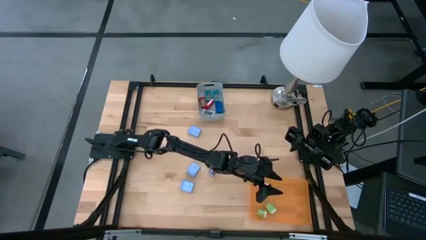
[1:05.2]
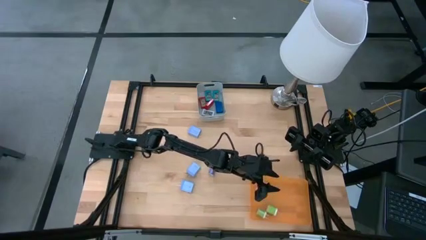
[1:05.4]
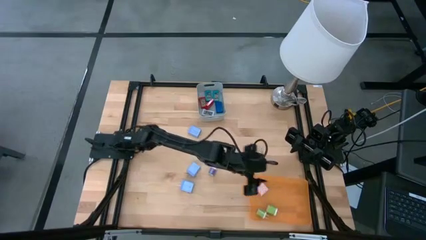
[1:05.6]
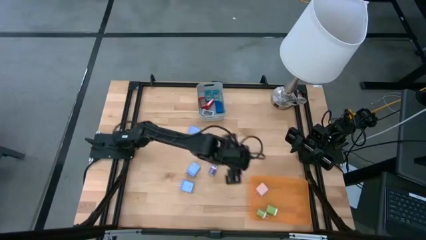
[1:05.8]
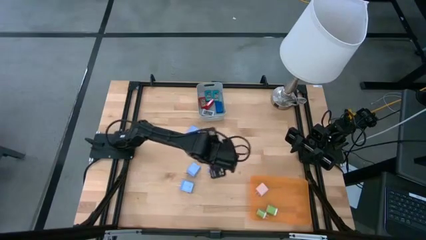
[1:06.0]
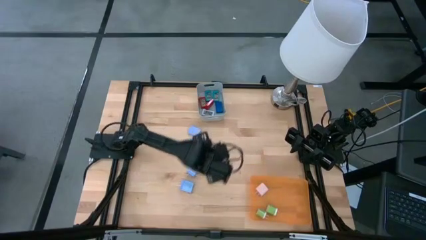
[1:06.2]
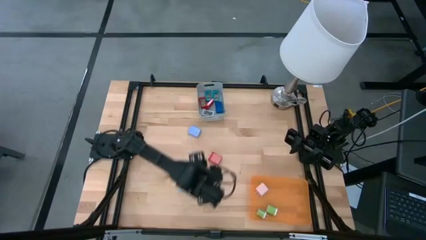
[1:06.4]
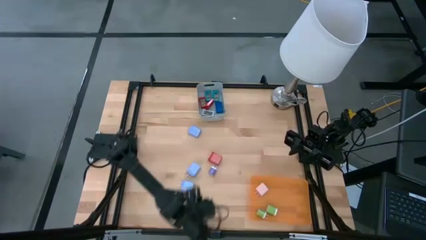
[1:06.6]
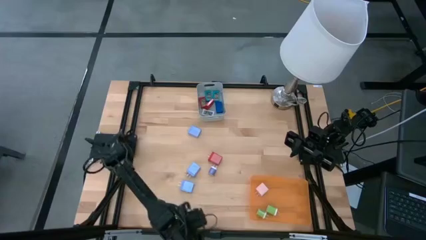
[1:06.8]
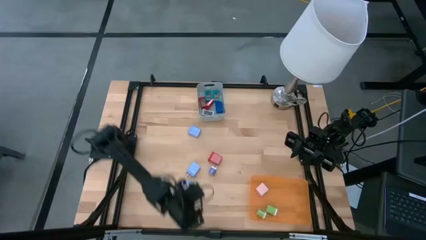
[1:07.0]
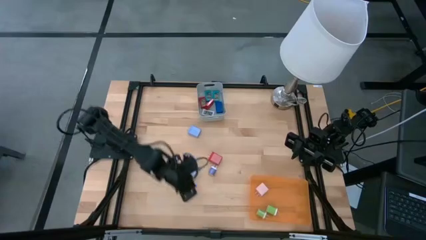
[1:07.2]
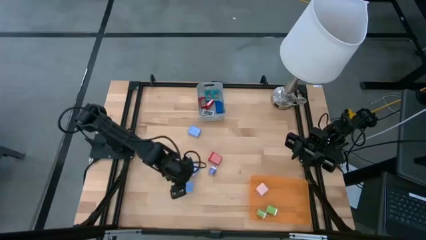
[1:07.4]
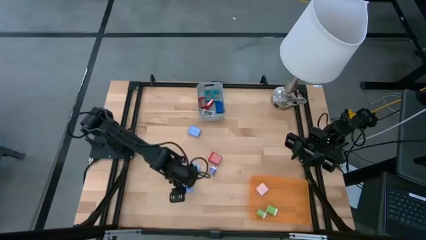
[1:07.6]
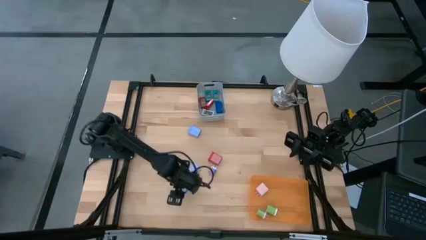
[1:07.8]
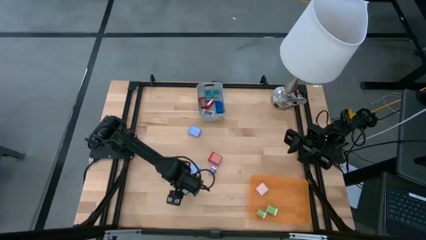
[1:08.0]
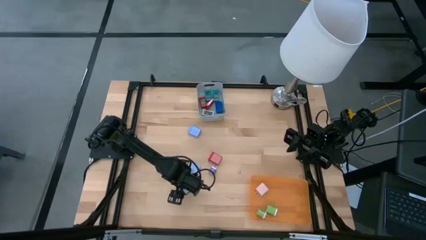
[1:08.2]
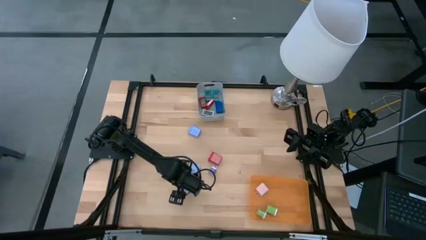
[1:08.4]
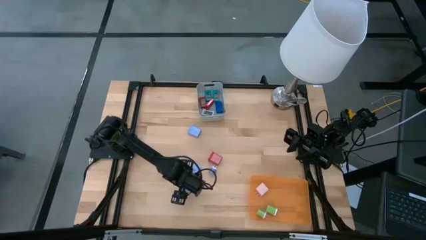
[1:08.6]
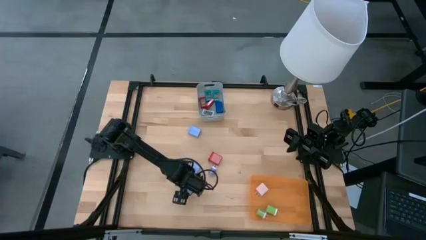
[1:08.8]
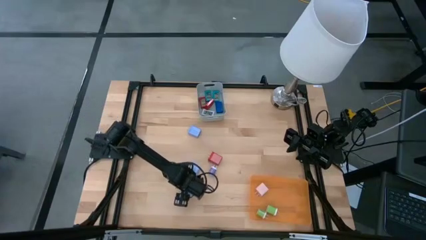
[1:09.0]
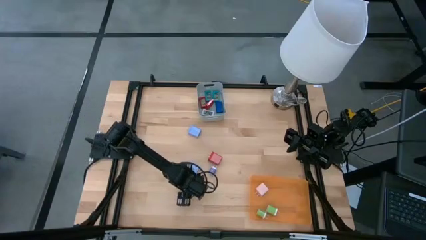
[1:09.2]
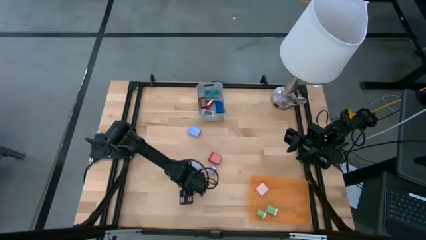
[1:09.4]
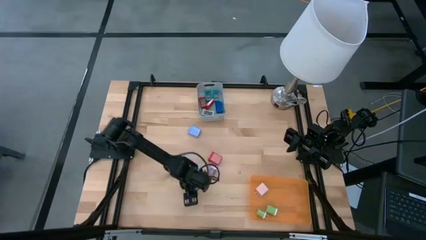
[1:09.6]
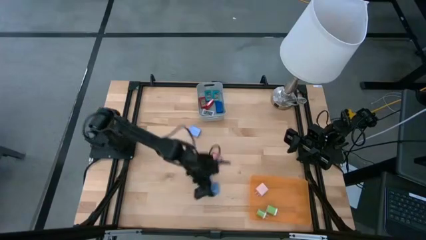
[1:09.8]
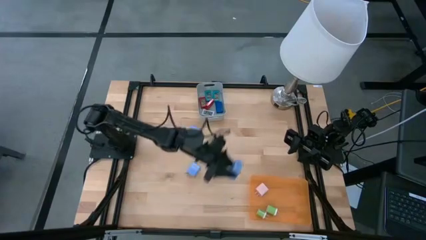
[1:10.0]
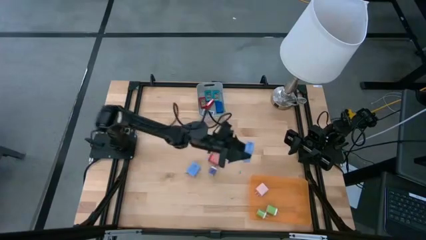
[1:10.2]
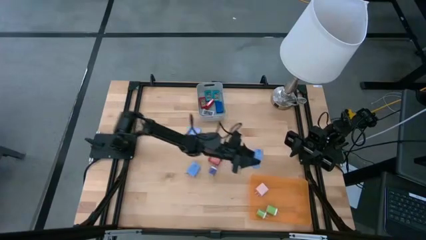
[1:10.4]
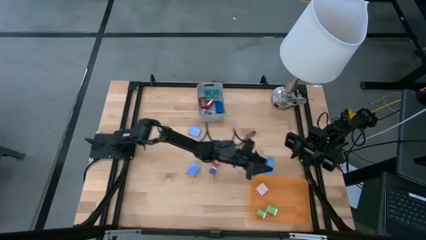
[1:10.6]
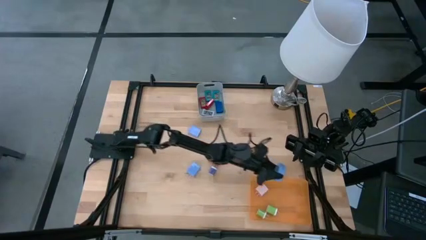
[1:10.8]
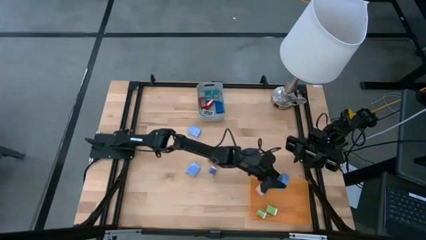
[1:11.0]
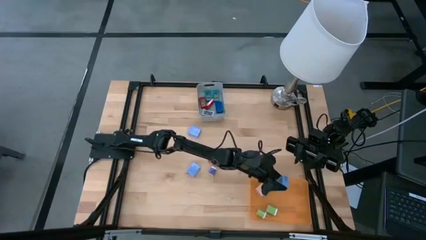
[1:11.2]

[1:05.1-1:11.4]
Task: Pick & Place Office items
Put the bottom light blue charger adapter into the orange bin

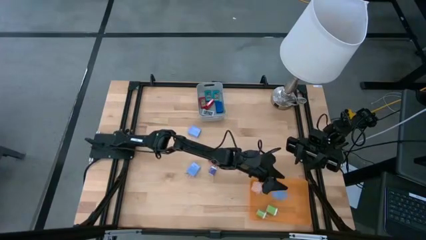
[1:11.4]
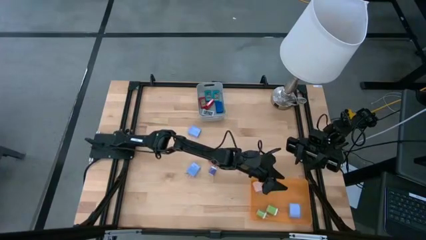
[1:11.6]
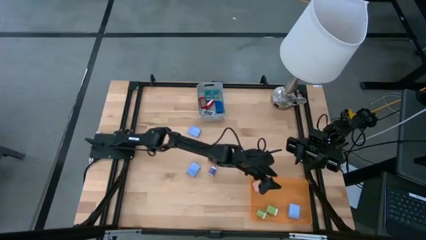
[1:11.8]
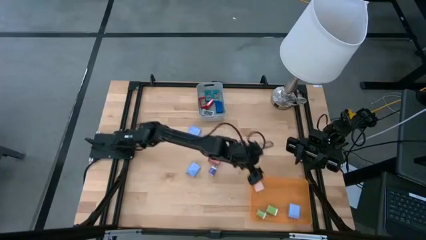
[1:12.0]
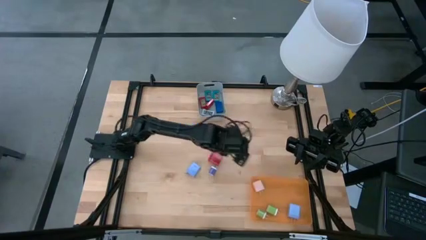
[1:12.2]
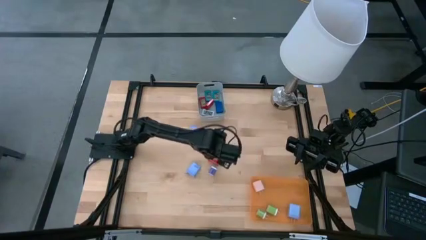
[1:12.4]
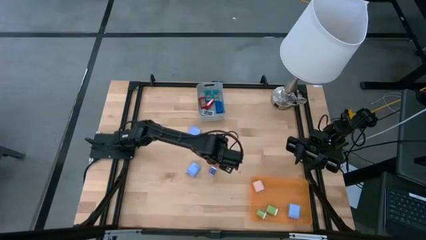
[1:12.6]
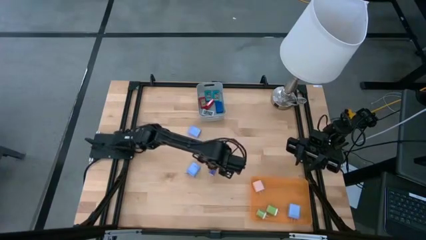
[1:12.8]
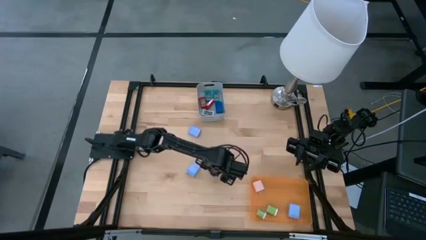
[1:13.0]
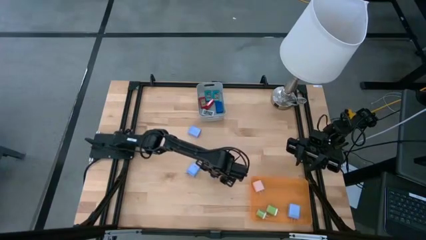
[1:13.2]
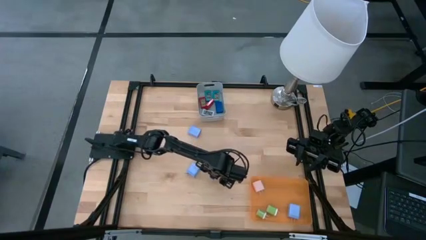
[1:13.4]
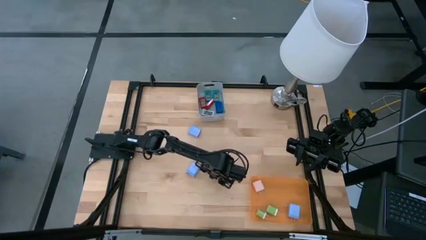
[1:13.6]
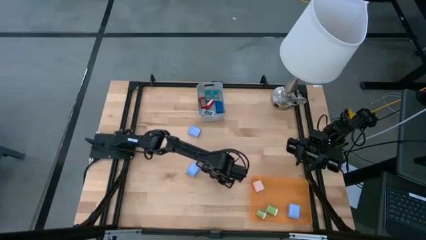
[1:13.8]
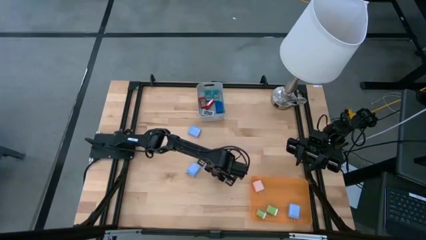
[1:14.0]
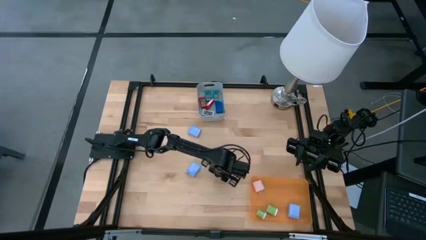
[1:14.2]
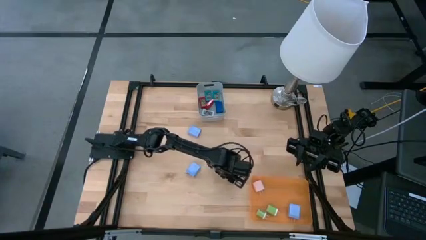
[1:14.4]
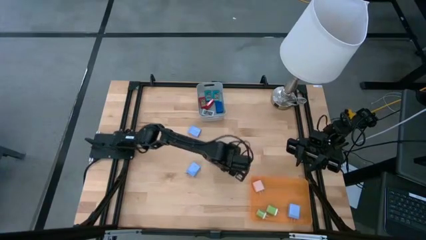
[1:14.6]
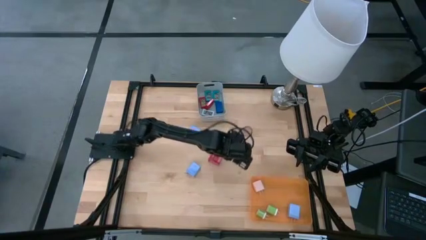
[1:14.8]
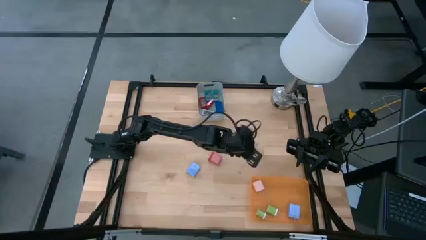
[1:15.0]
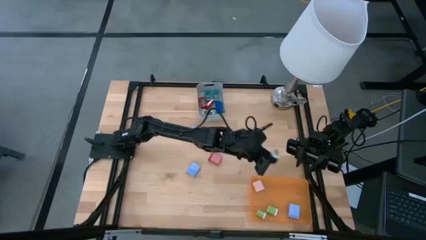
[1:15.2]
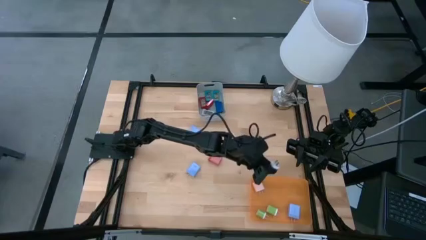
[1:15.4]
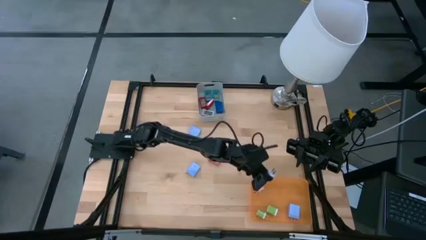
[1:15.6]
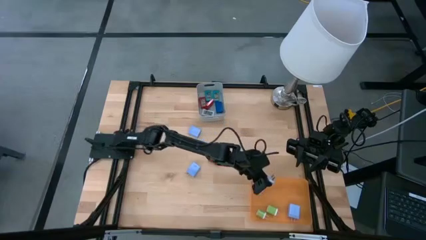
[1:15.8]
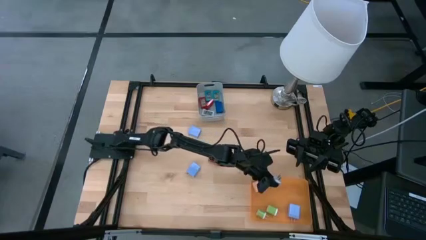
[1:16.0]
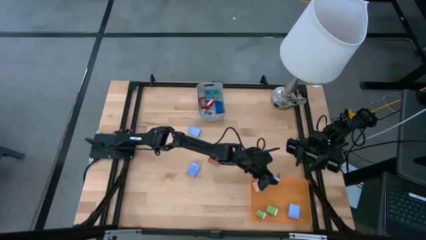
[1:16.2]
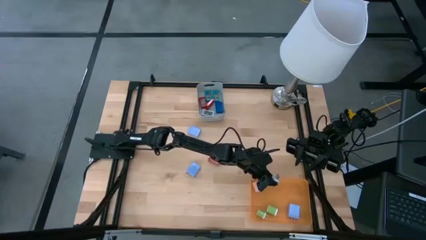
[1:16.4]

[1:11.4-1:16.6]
Put the dark blue charger adapter into the orange bin
